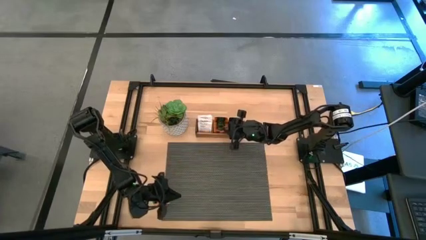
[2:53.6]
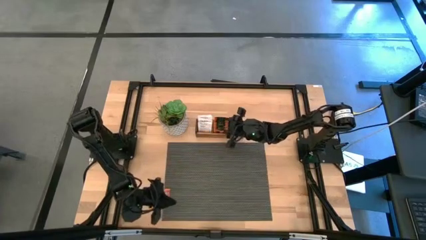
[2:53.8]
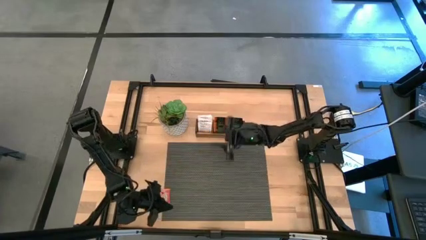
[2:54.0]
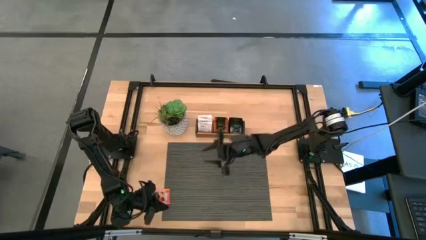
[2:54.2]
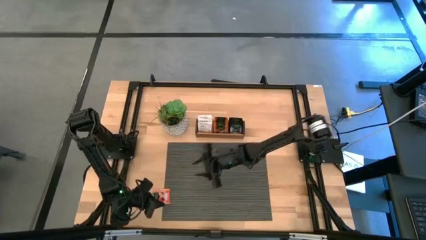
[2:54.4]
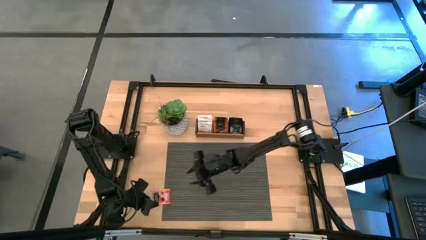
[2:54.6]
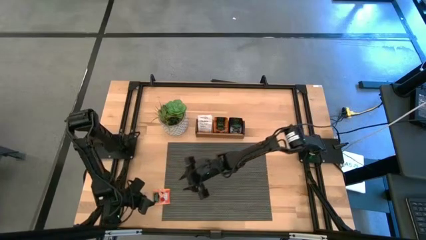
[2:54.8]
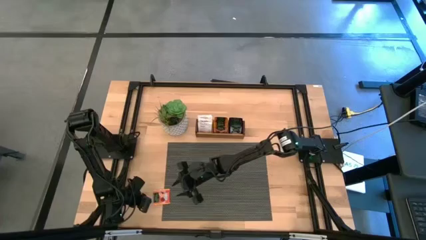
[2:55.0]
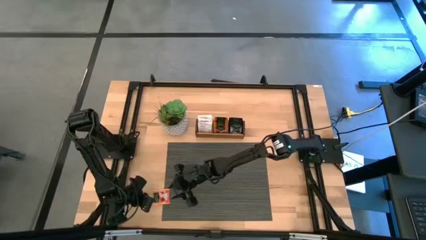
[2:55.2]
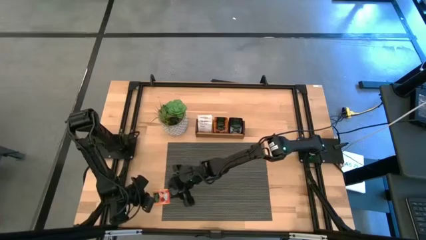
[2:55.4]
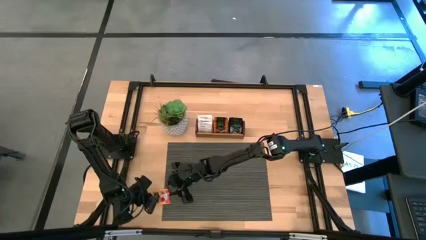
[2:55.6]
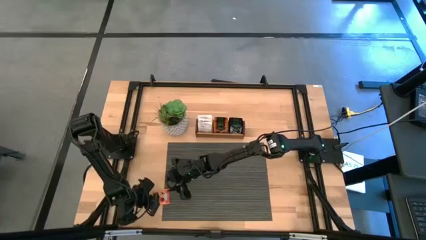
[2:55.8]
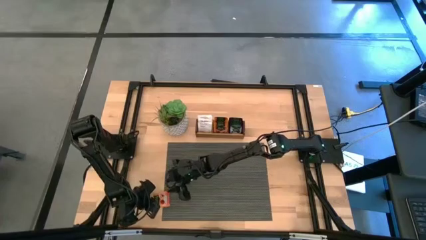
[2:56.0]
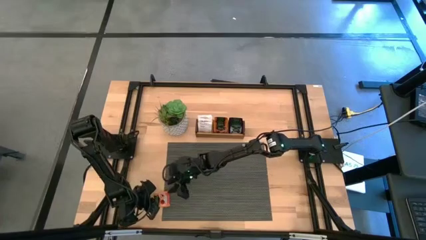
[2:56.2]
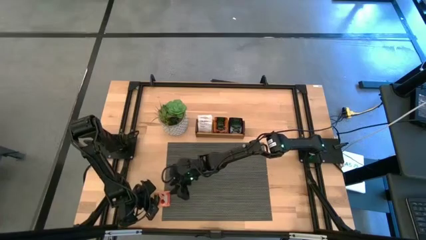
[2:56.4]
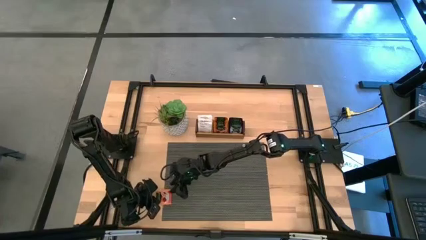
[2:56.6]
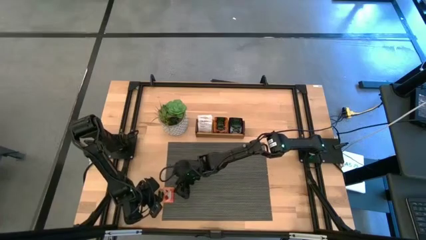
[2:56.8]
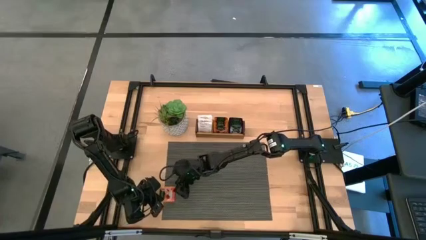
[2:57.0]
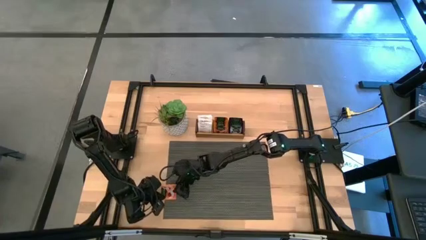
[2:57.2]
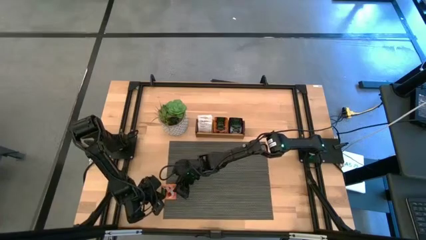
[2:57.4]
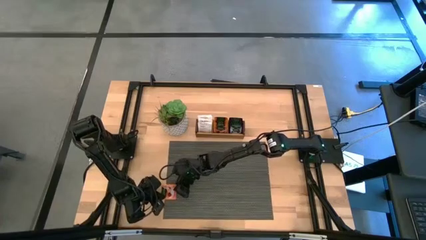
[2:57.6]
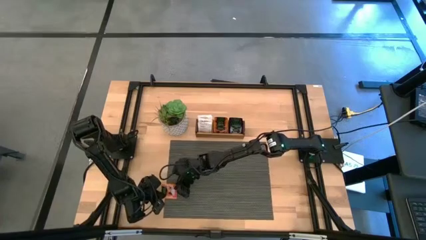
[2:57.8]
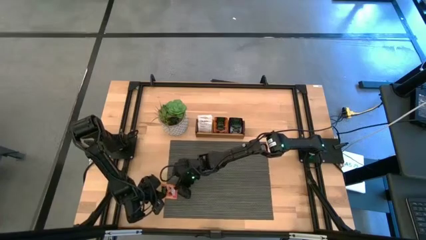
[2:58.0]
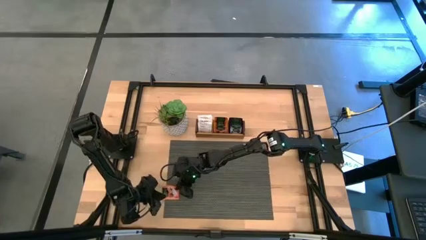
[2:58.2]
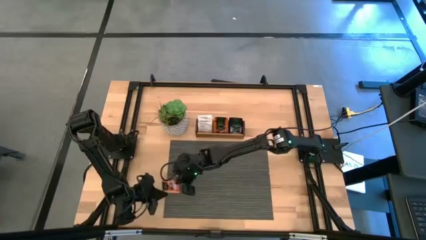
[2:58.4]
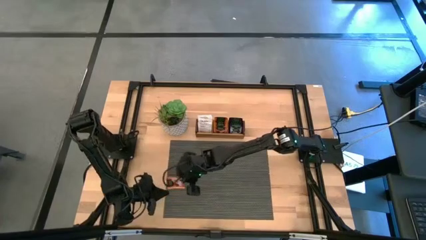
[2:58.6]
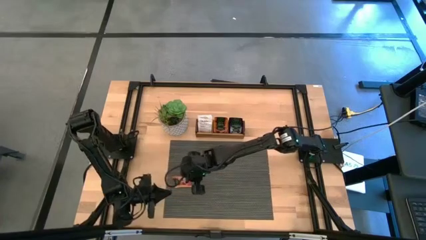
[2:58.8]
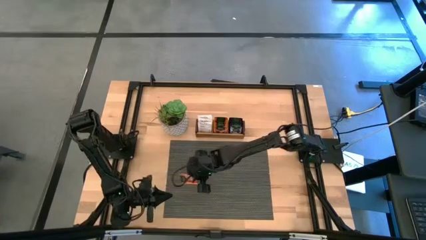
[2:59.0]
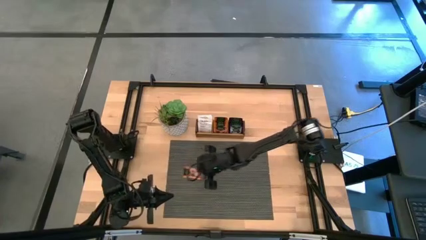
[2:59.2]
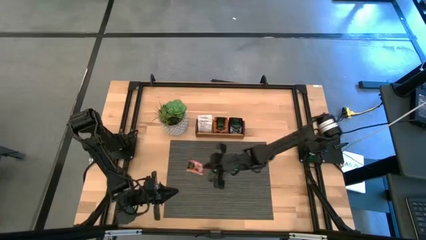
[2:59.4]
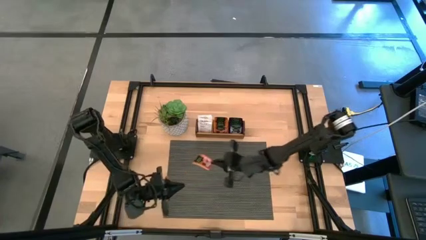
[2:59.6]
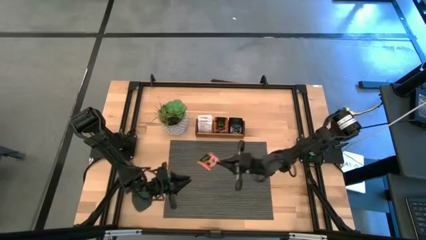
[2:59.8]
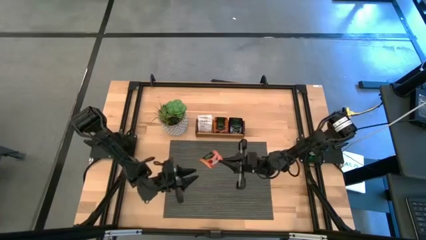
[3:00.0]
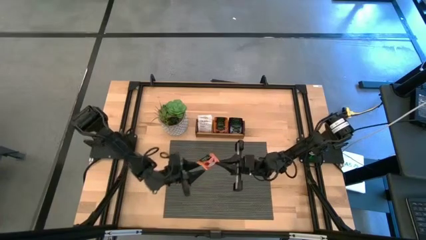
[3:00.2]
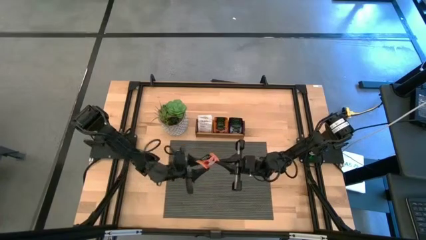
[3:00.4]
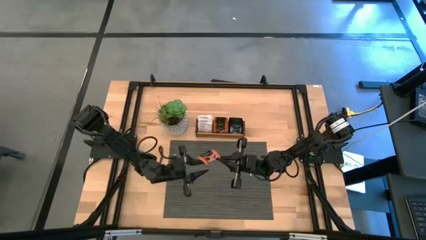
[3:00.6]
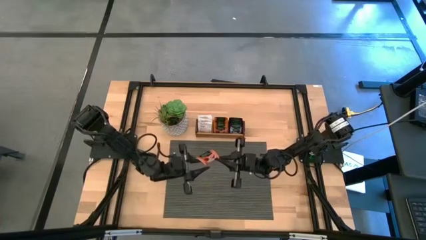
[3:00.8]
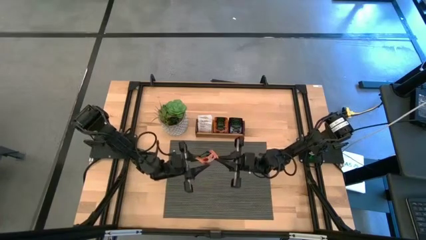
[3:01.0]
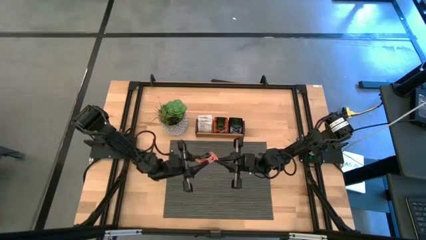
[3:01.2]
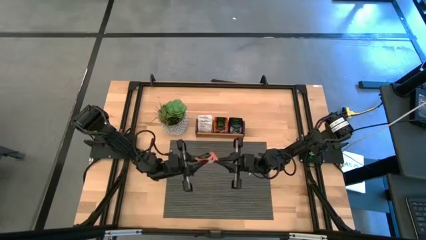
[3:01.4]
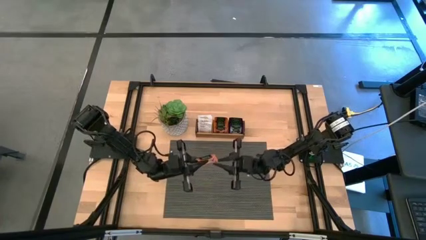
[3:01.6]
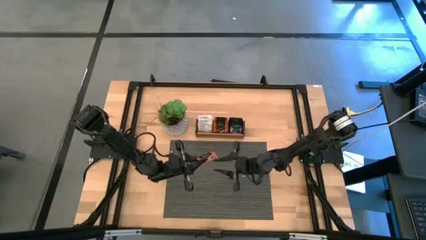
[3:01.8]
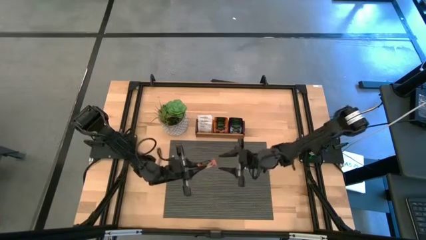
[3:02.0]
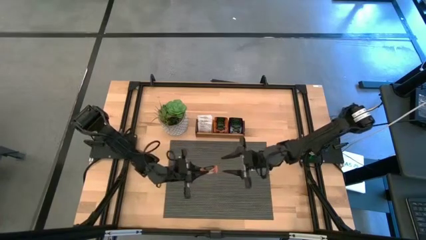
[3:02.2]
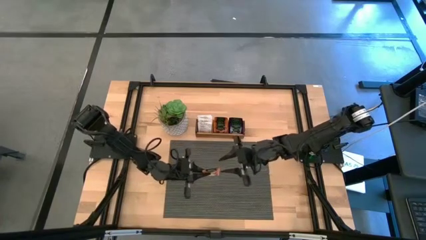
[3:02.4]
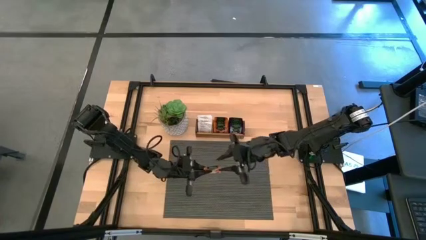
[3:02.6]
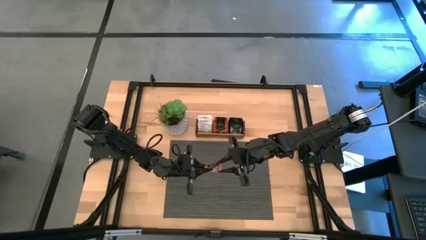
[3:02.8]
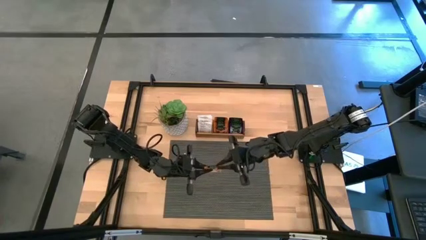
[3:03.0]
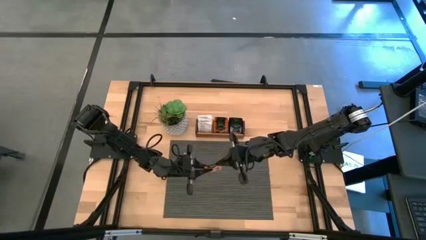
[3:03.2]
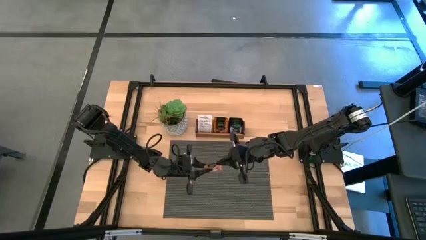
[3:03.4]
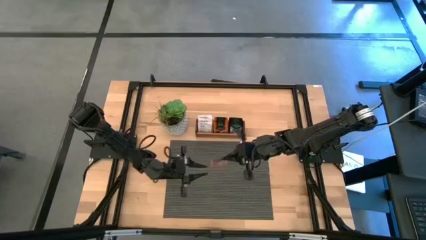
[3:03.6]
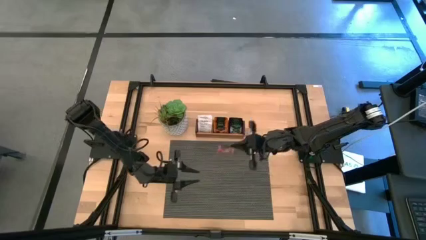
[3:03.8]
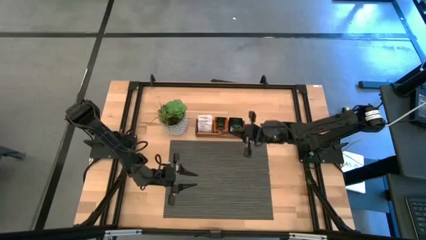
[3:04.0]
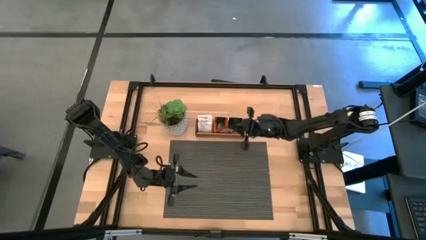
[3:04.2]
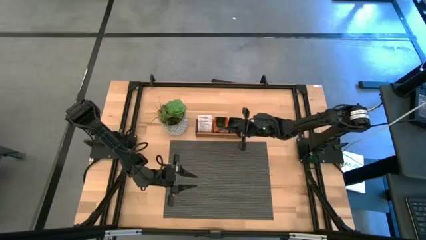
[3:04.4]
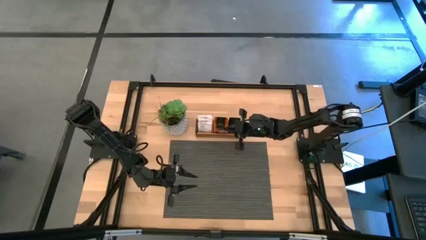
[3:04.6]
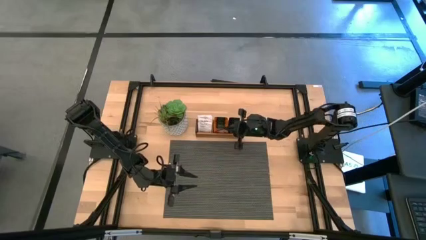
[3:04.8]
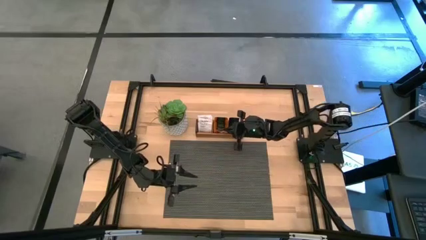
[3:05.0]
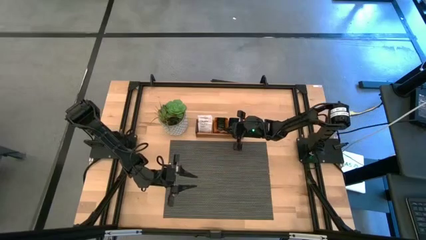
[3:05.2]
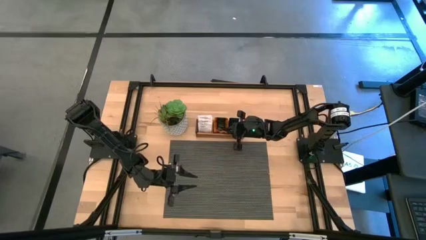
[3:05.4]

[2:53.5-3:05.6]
Task: Pick & Place Tea
Put the orange tea bag into the middle section of the wooden organizer

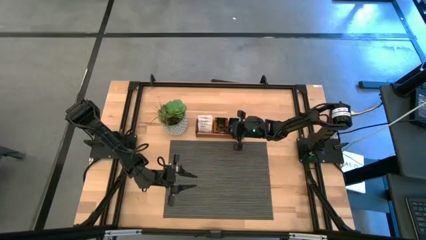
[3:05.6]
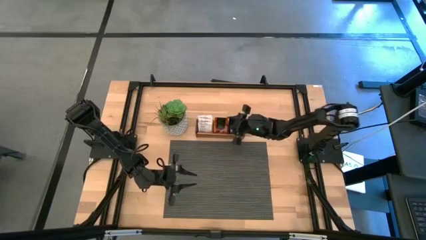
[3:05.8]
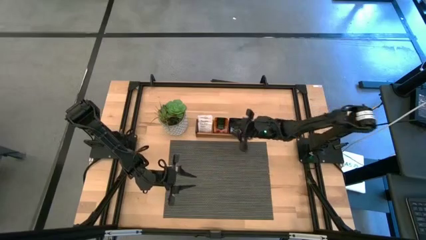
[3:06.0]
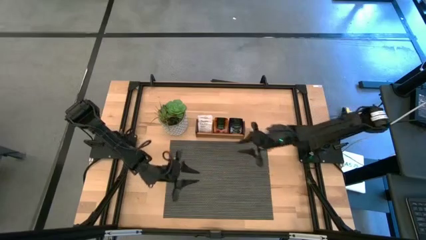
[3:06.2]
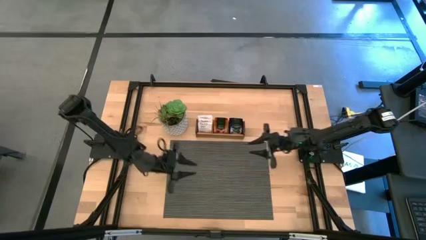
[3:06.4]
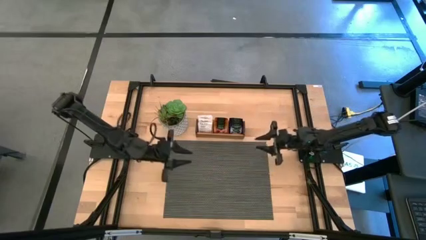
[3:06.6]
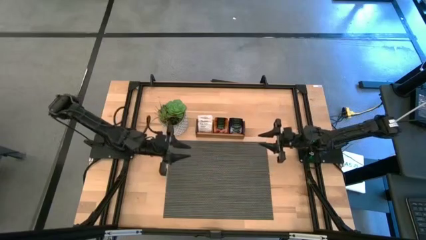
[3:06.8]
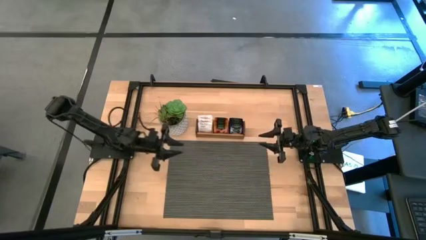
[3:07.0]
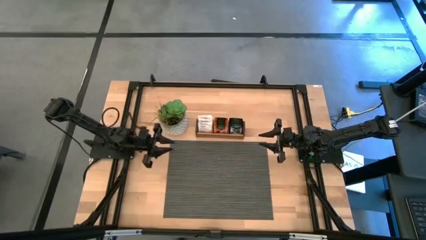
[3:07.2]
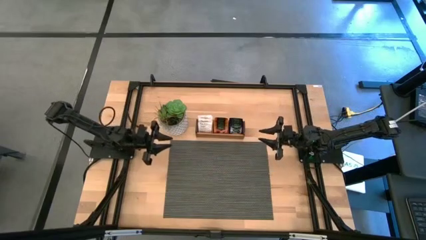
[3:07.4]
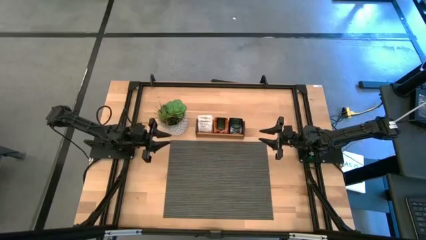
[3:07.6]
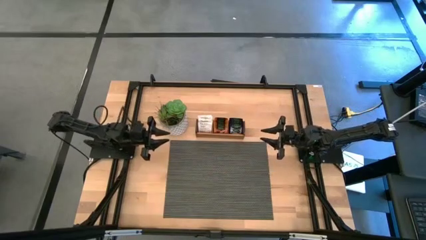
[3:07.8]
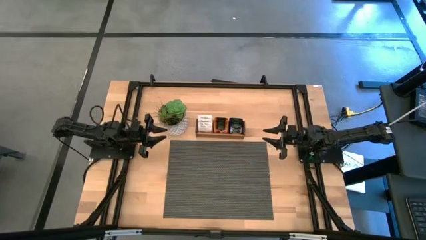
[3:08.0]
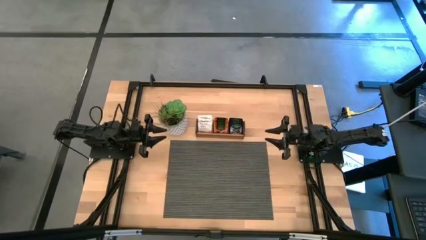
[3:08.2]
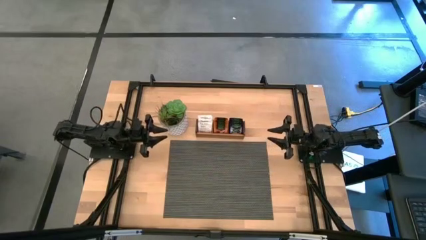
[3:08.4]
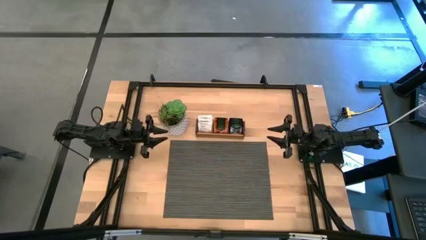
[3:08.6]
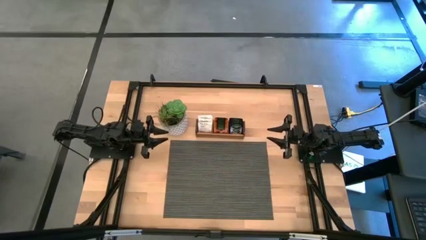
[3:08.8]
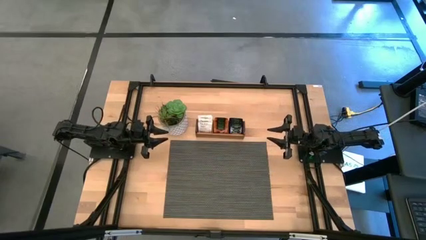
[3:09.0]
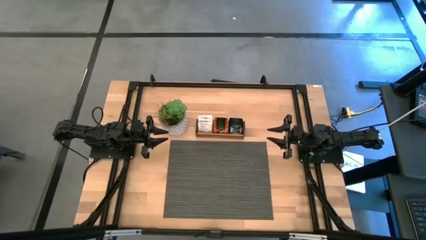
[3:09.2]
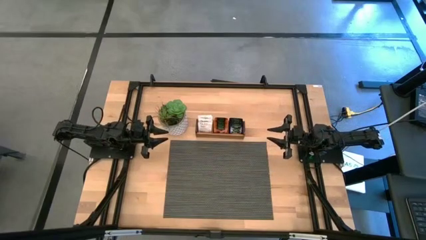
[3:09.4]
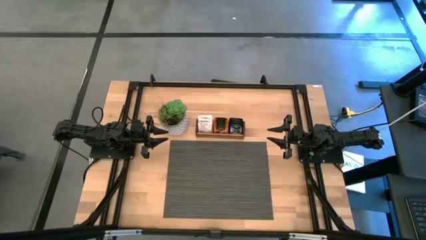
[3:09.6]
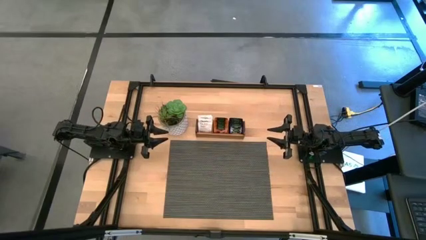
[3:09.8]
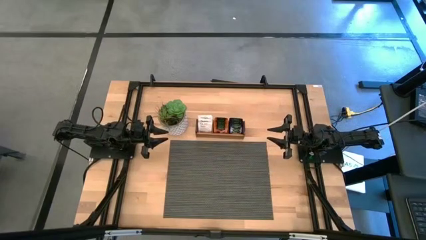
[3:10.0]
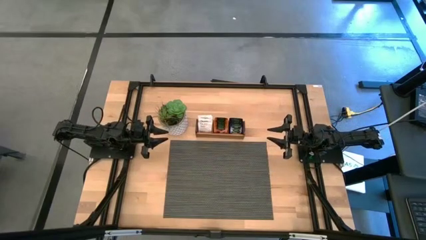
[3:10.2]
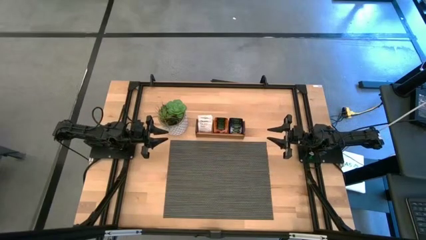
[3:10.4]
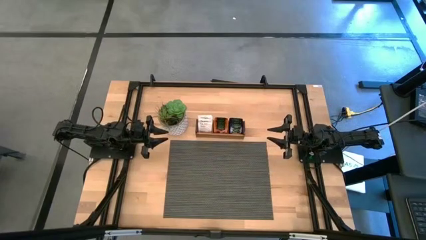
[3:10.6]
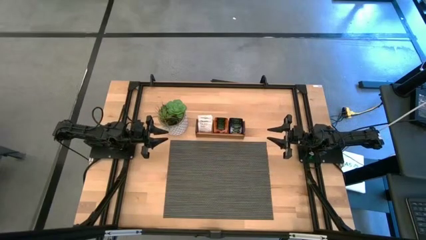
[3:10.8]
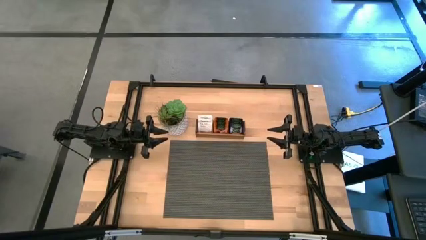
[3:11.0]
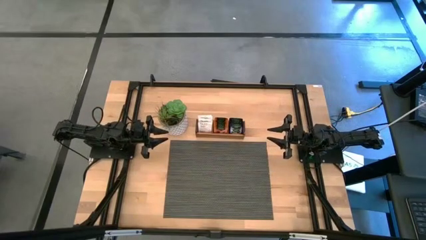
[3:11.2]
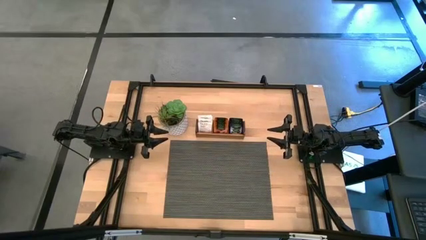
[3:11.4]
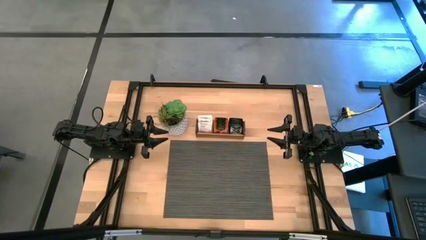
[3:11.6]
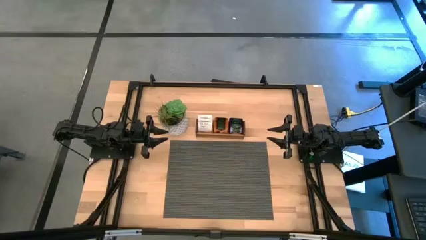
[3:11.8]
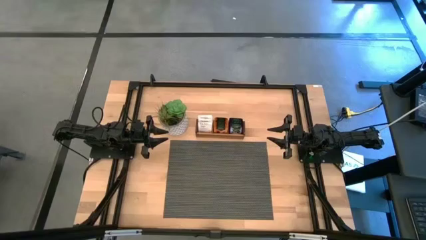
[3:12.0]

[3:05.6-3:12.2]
Return to Home Position
